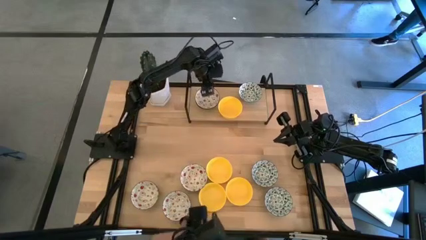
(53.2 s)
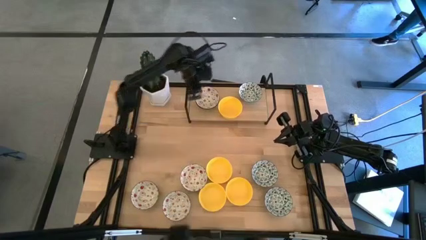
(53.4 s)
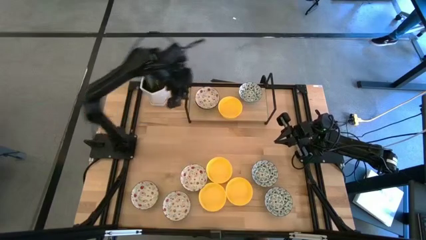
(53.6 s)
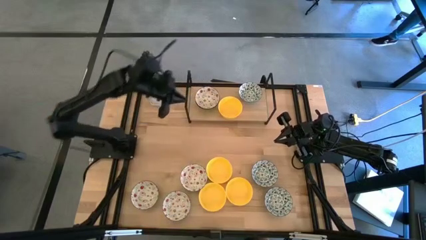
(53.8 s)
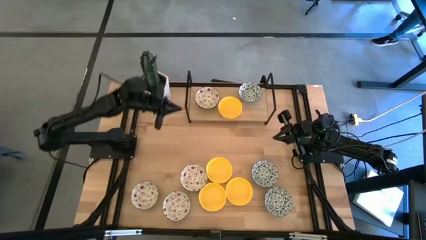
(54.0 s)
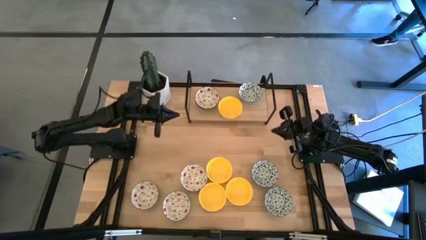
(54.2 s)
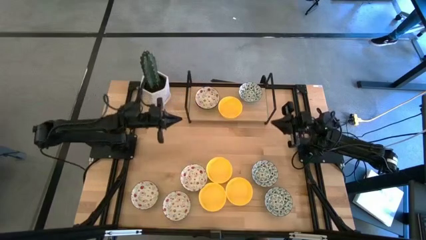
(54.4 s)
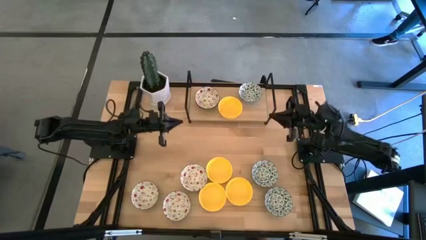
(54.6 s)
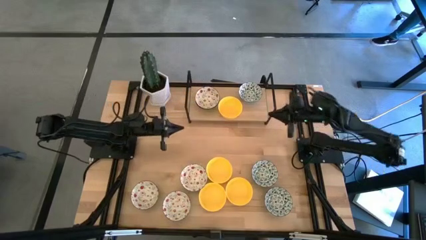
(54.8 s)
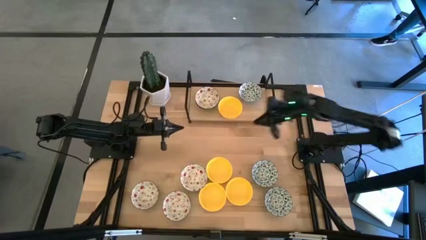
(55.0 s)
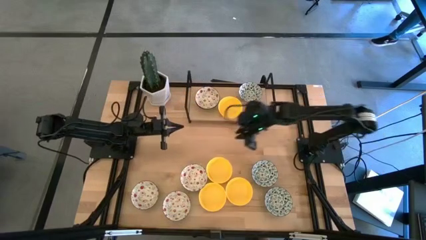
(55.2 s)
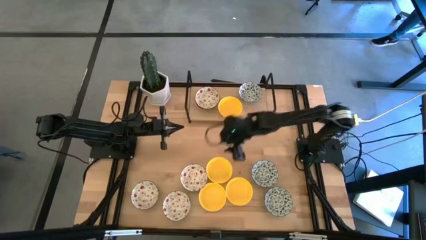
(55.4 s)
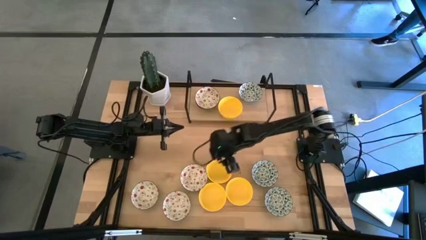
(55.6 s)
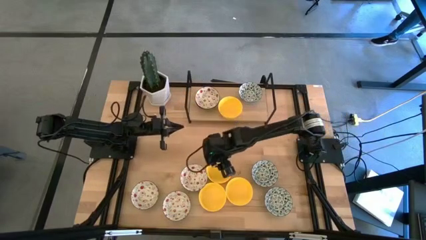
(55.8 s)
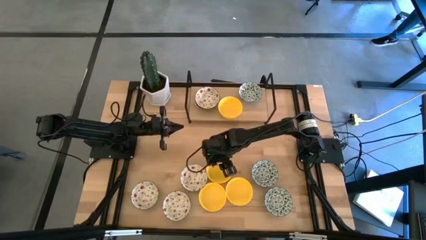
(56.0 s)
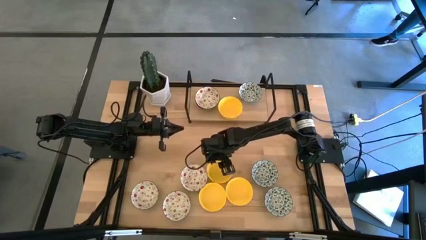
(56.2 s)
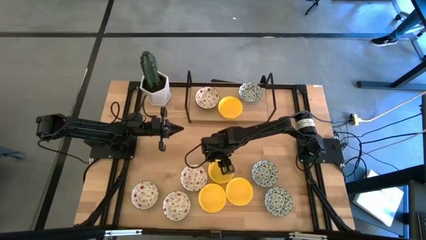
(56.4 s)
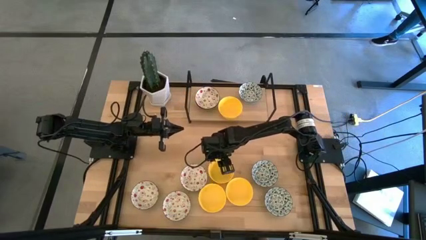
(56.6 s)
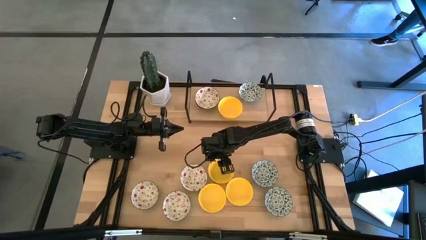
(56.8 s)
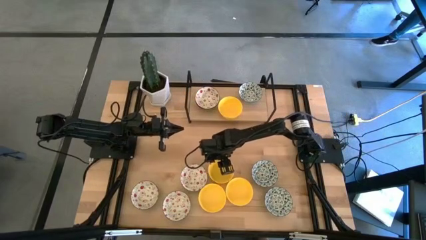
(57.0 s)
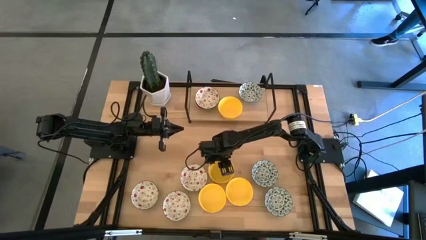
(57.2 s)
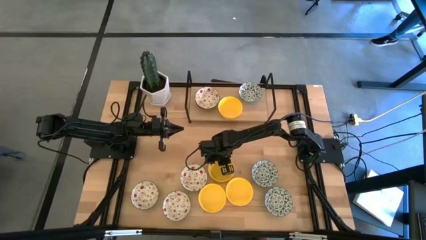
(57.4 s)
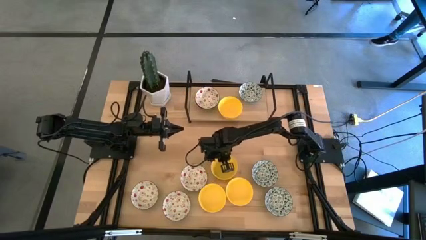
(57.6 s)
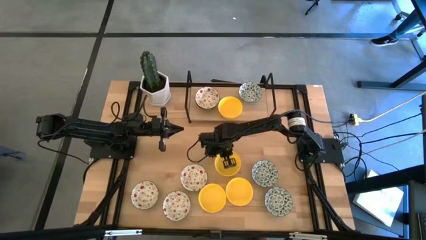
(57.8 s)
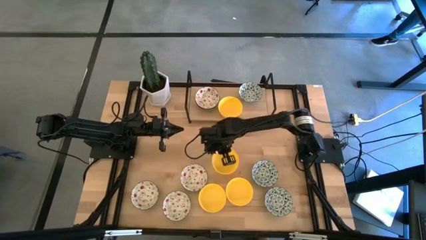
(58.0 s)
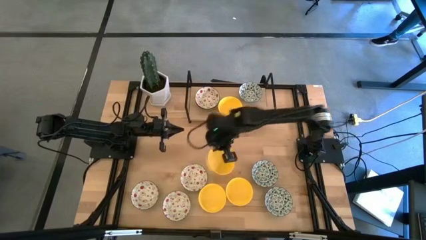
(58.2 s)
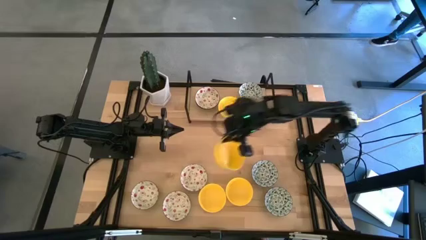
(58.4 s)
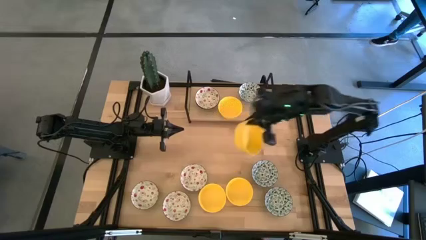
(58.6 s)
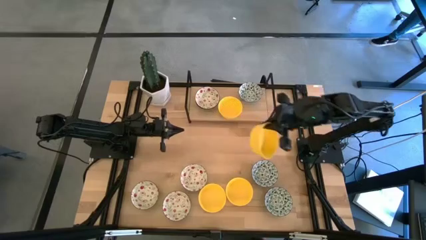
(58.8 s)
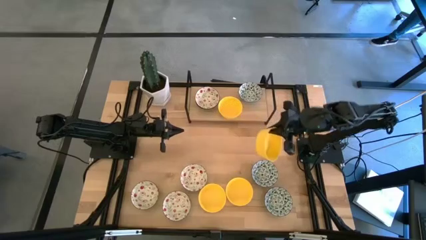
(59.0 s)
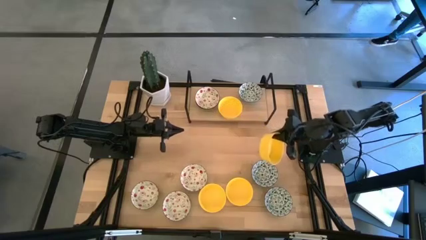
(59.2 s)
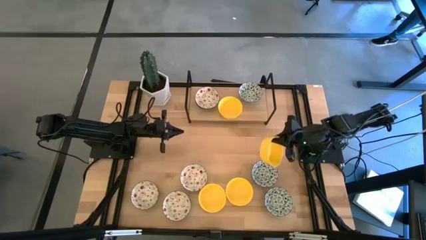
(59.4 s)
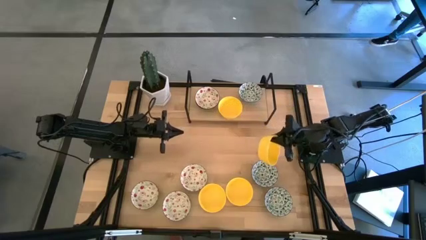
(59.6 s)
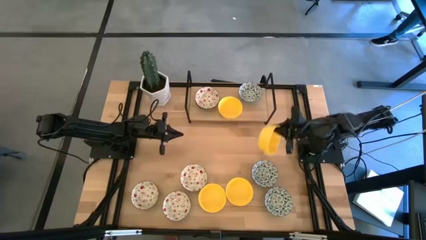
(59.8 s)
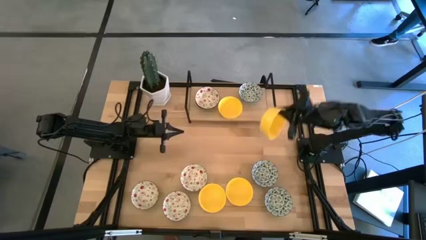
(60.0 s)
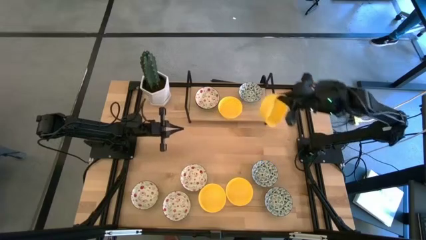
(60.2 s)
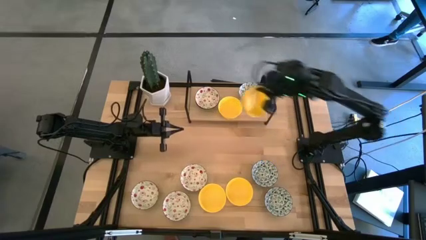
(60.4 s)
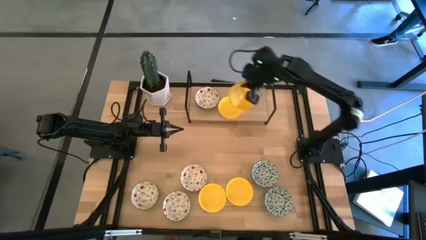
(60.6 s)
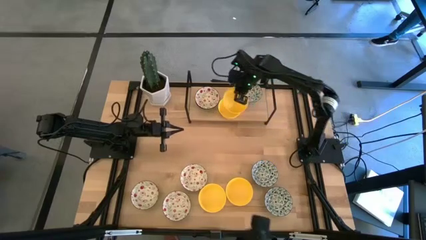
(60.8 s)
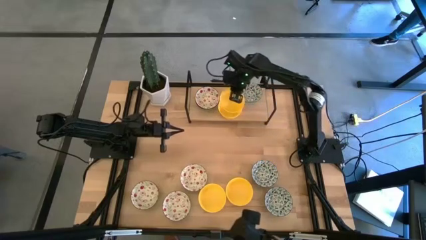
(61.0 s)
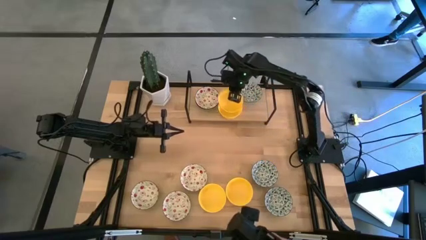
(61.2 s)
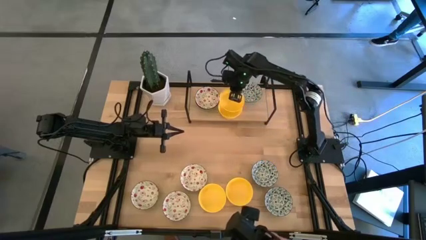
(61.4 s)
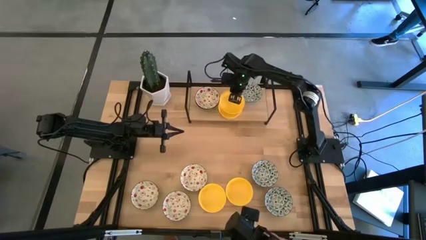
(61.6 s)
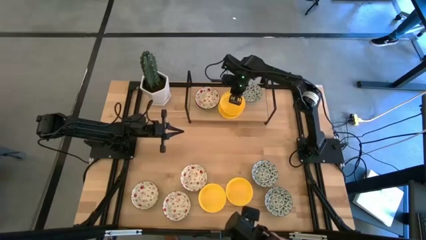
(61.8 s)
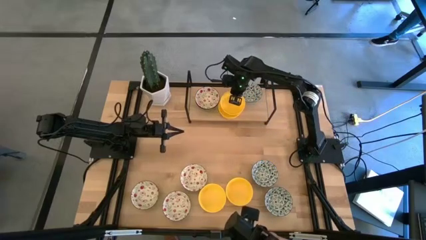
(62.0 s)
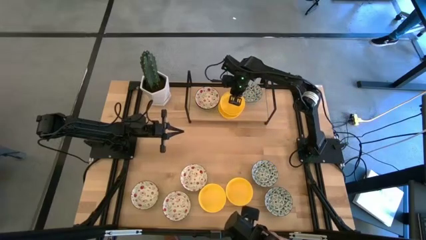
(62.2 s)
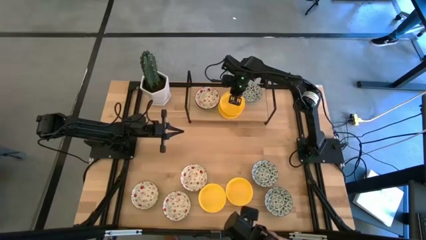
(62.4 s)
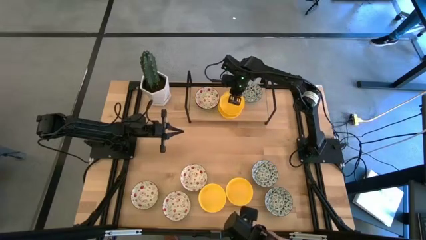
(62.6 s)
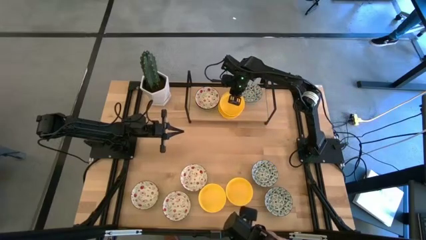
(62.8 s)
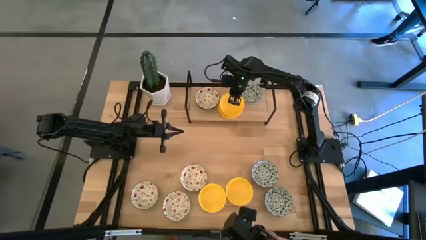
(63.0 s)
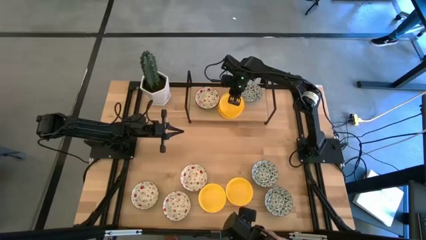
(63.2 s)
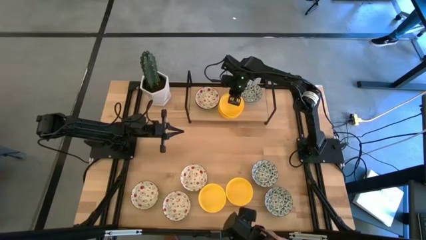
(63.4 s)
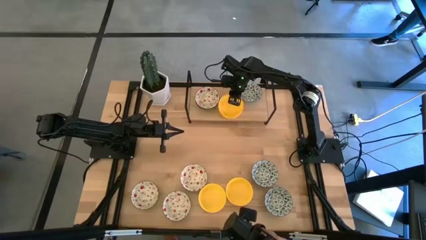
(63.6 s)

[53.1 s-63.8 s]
Task: Pick & Place Mini bowls
Stack the yellow bowl on top of the yellow bowl on the shelf
